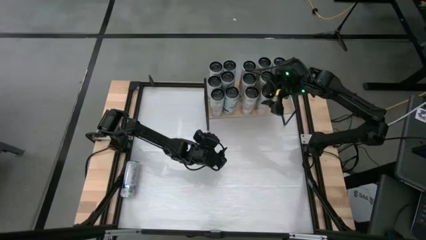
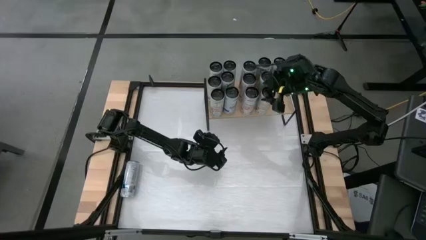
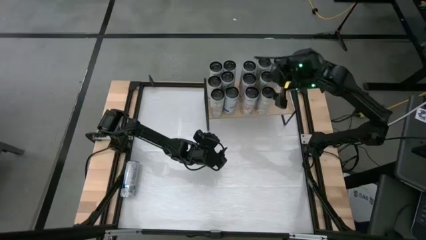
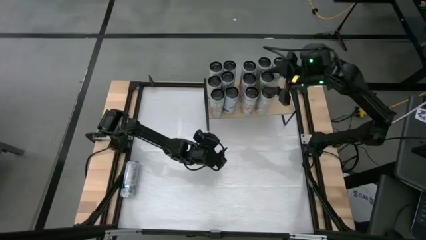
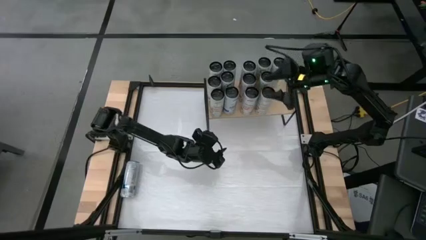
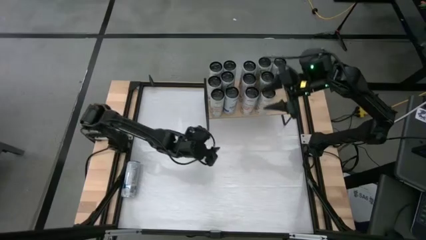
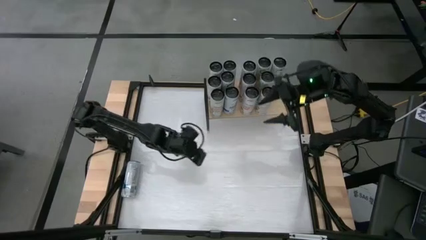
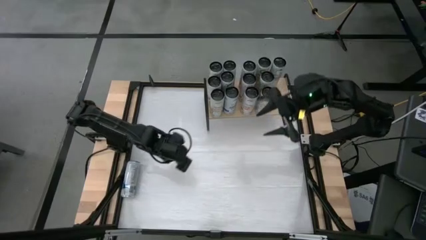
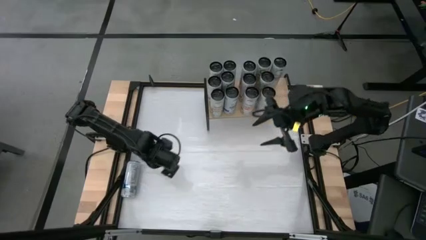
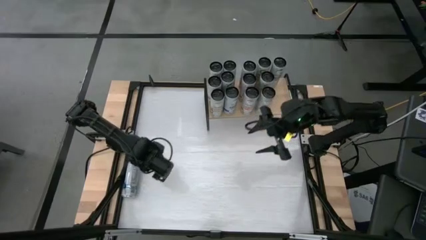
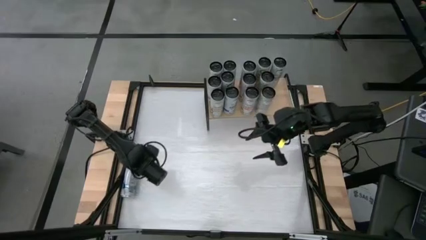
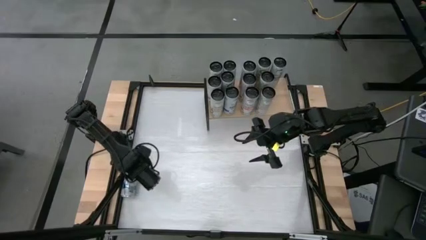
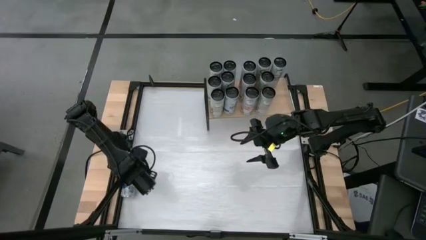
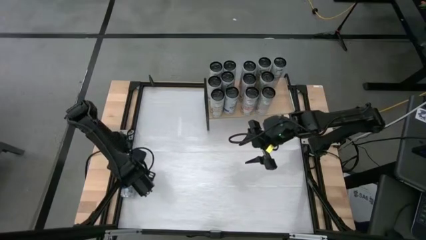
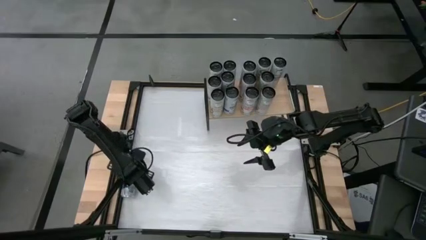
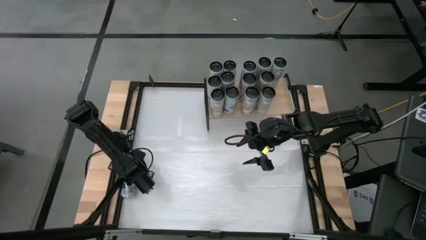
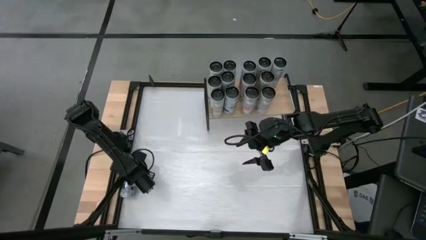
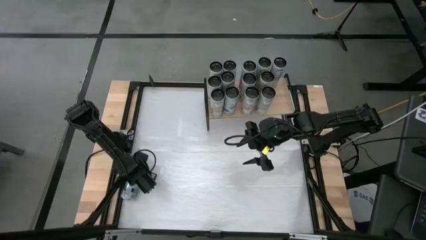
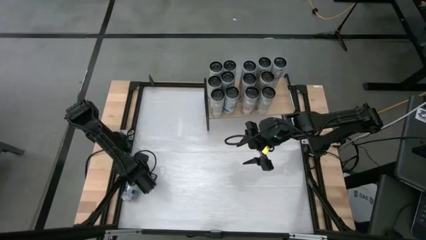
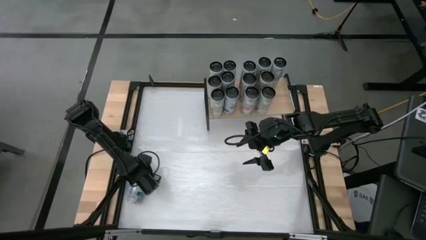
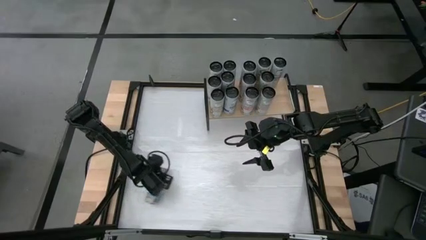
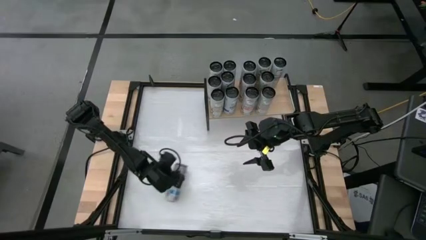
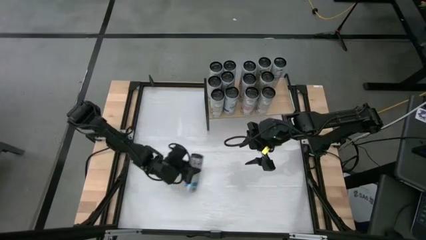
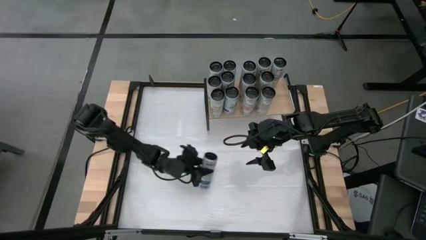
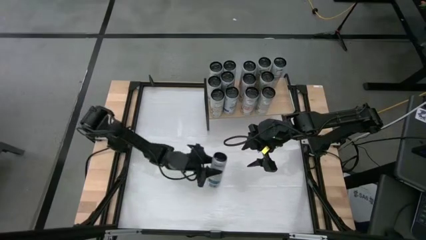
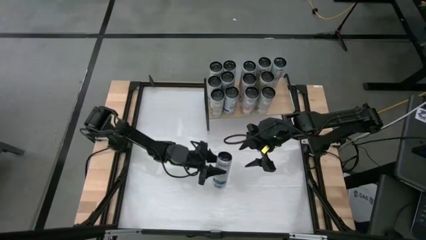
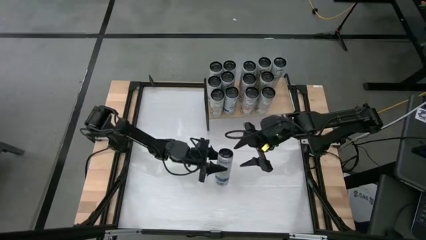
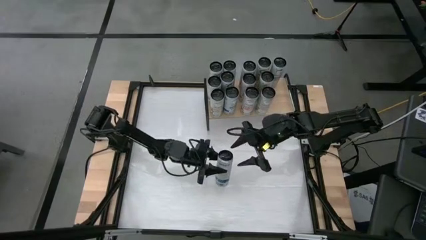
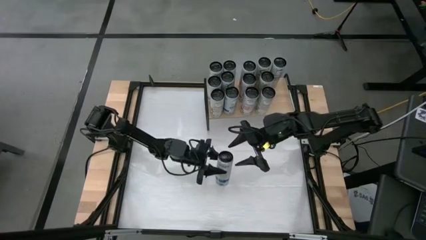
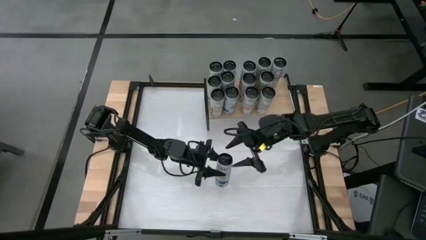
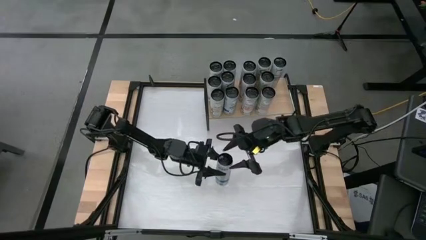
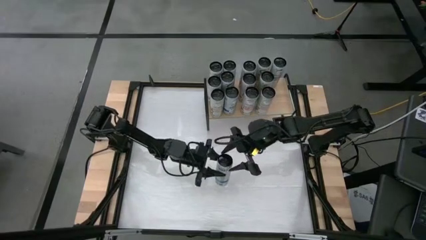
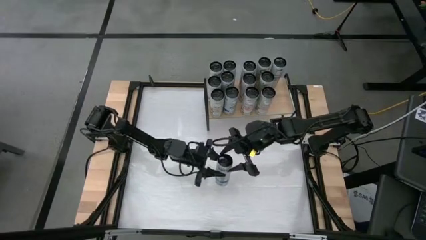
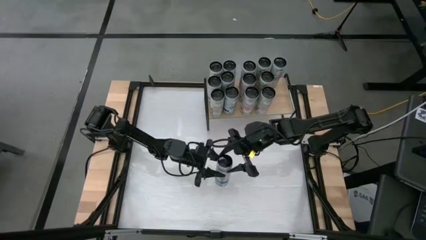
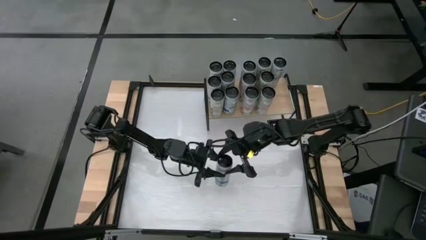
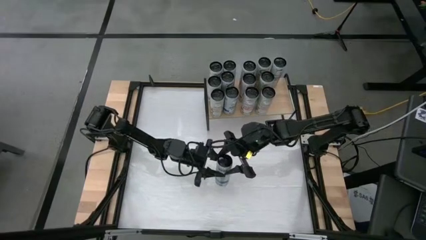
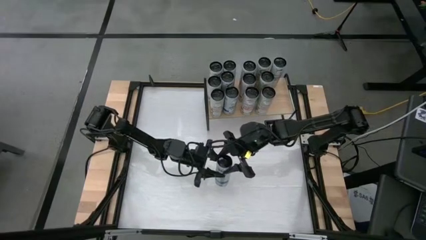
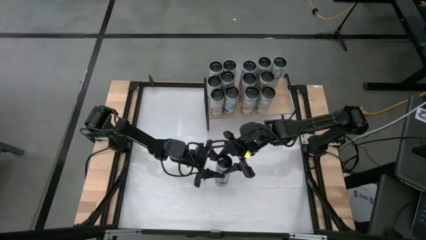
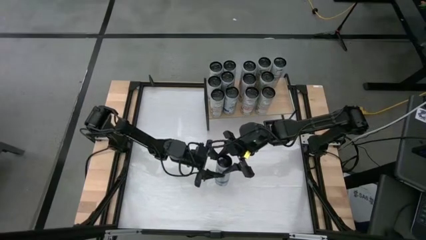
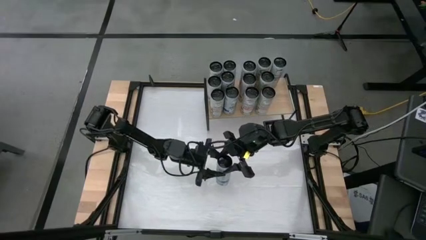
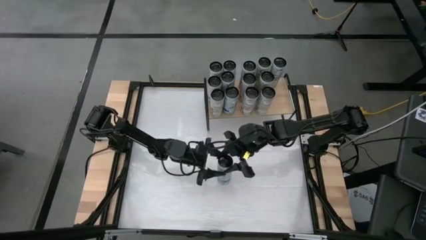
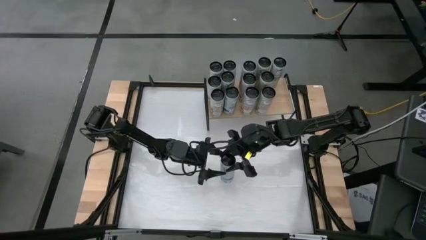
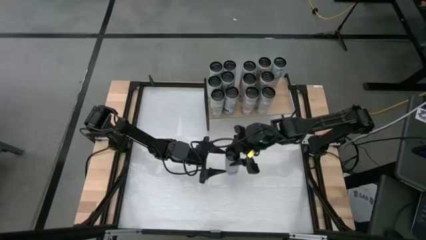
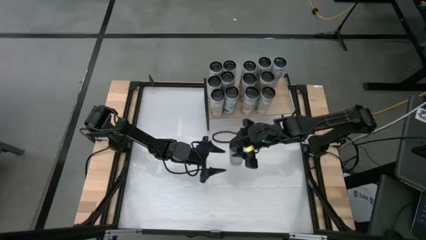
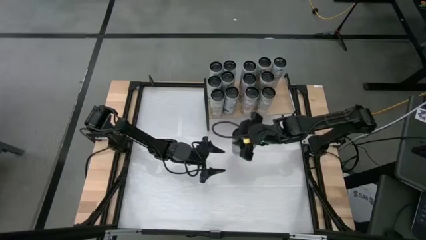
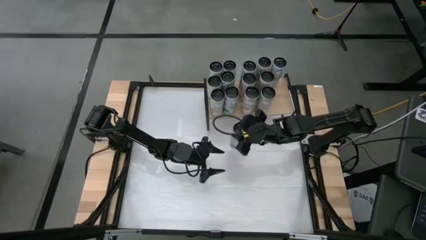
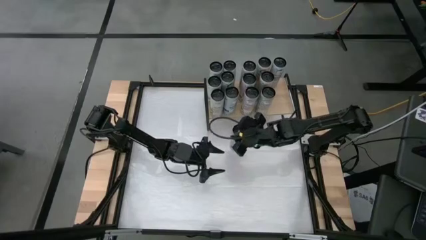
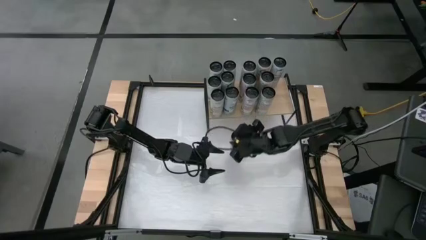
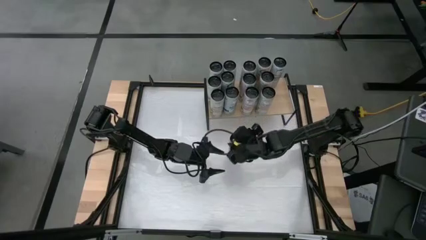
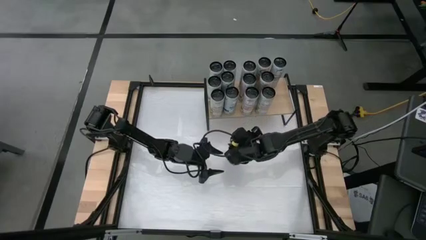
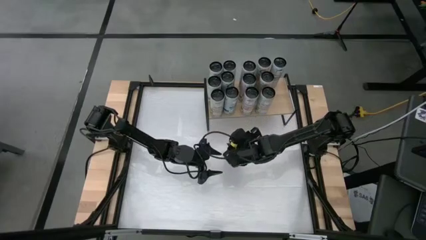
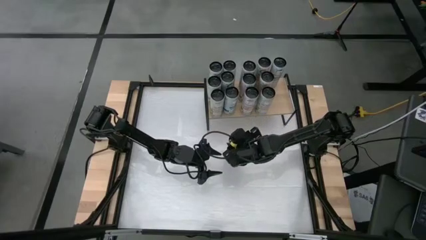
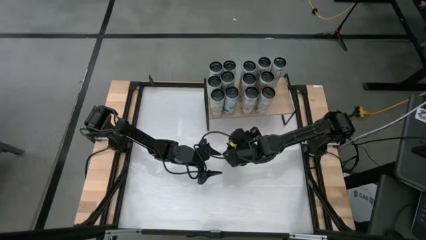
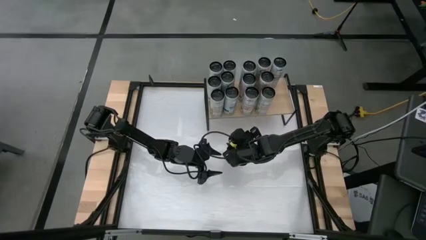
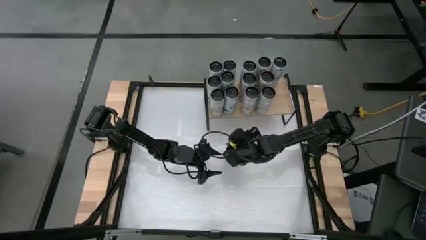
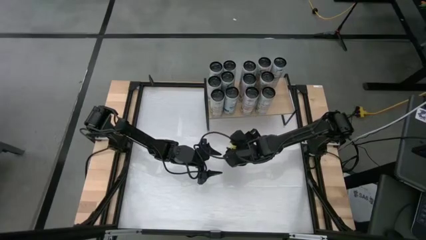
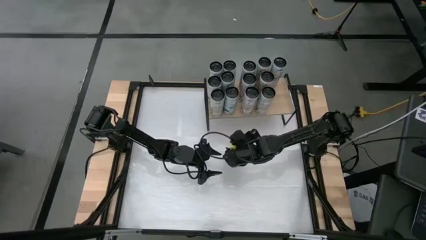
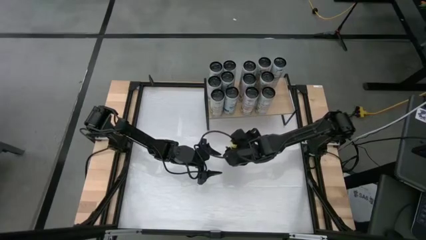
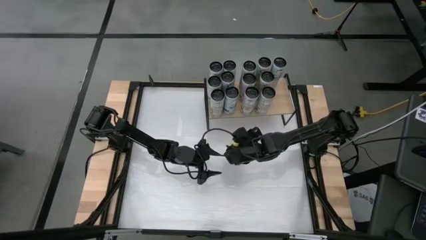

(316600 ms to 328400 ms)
Task: Place canned beverage on shelf
Put the blue soda can on the shelf aligned with the blue soda can

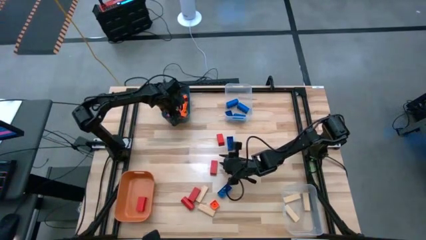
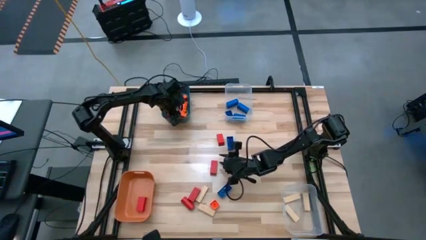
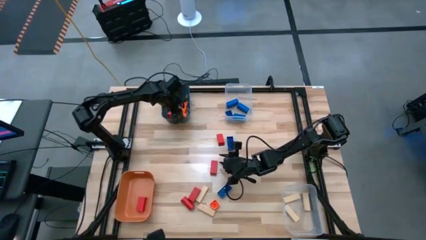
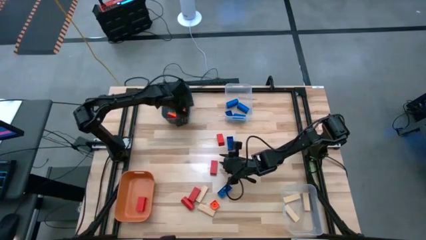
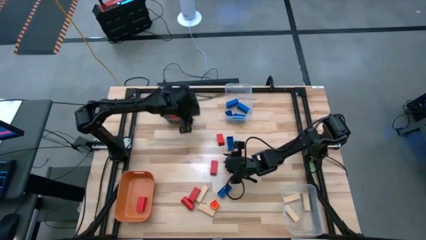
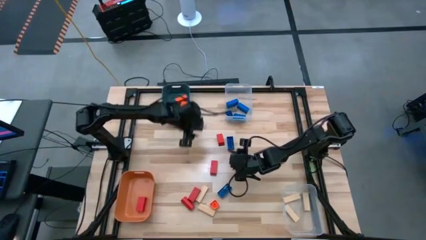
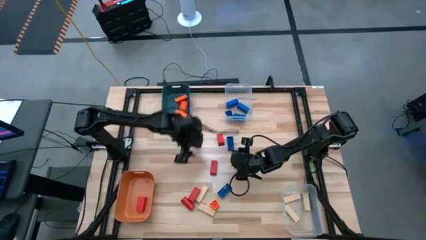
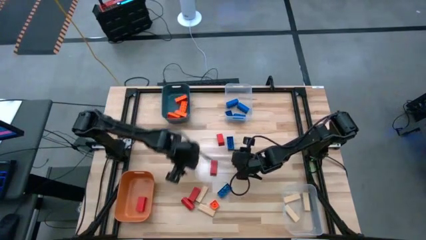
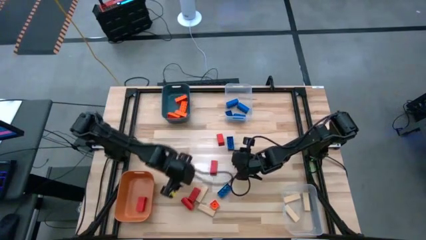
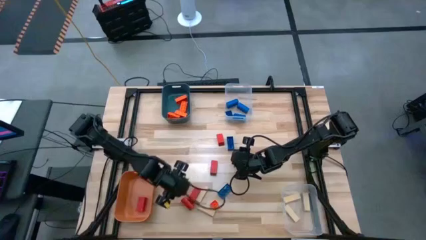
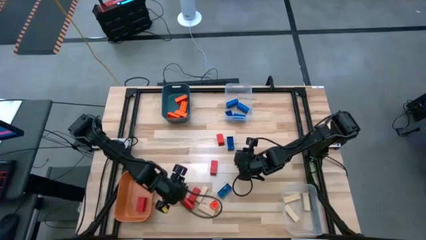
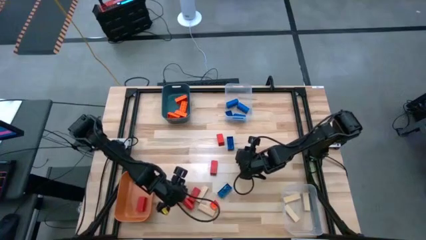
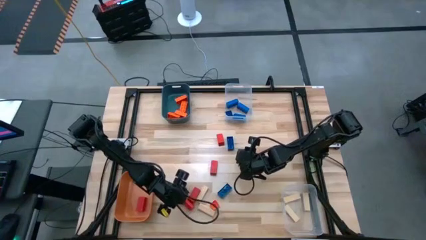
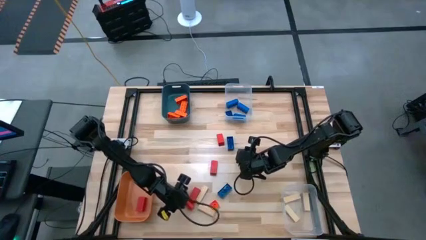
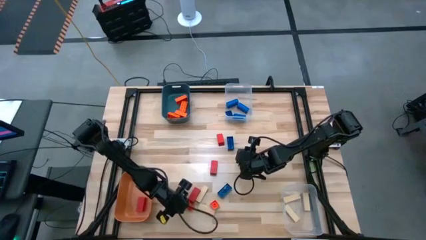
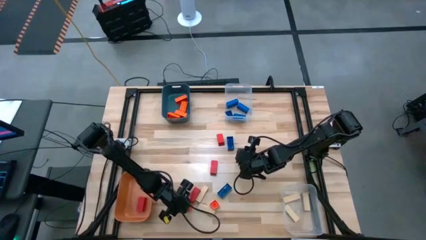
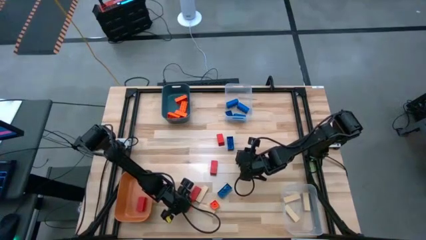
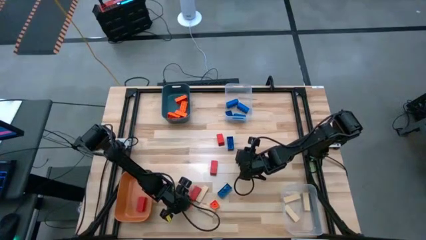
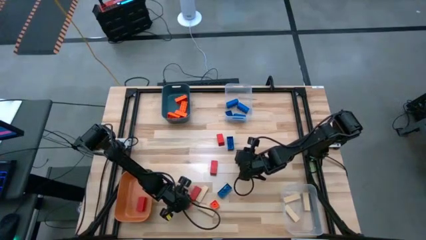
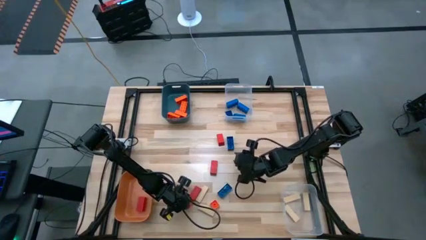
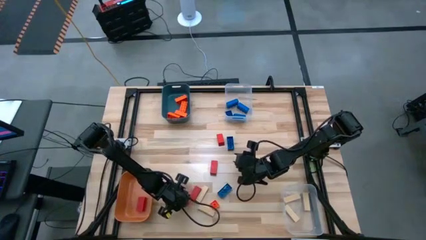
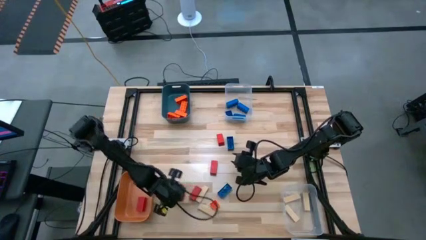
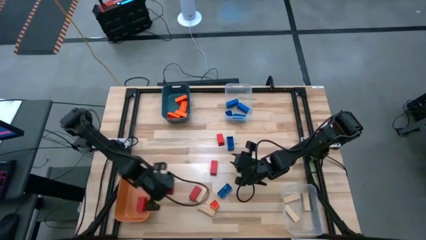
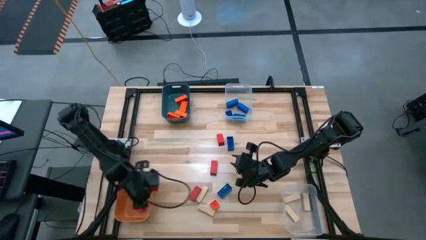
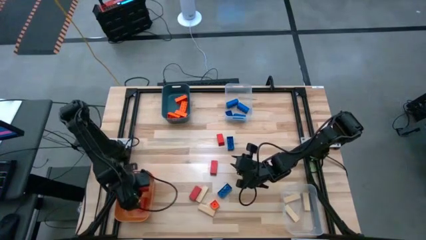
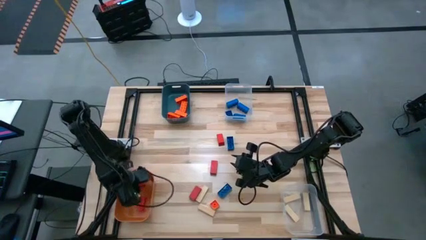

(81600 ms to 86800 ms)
Task: Sort blocks
Put the red block into the orange bin
